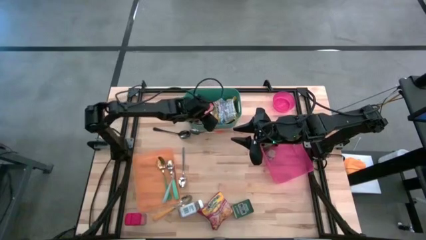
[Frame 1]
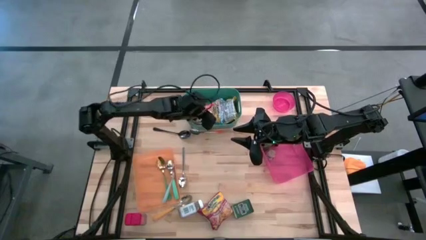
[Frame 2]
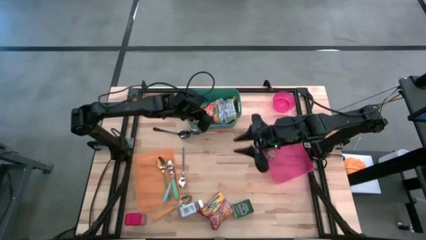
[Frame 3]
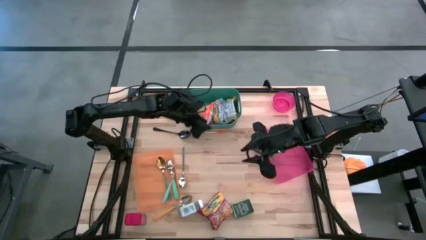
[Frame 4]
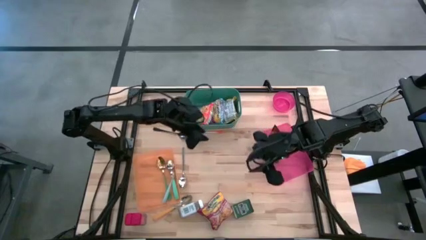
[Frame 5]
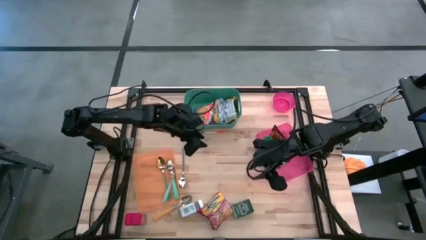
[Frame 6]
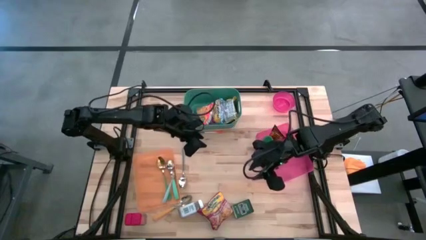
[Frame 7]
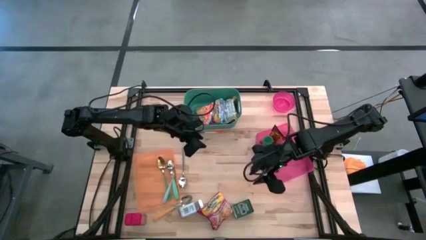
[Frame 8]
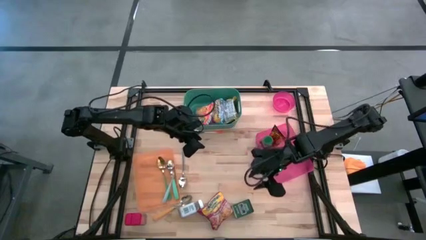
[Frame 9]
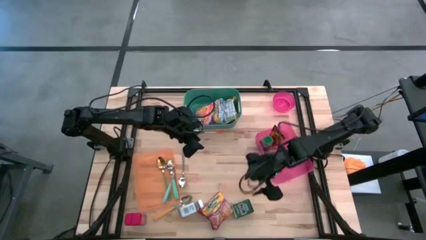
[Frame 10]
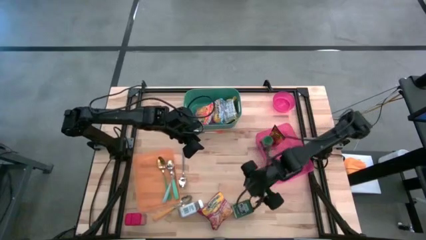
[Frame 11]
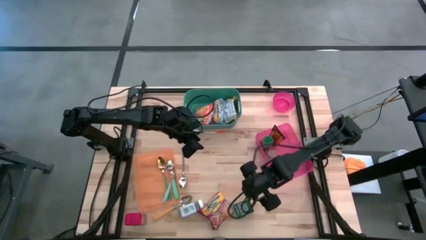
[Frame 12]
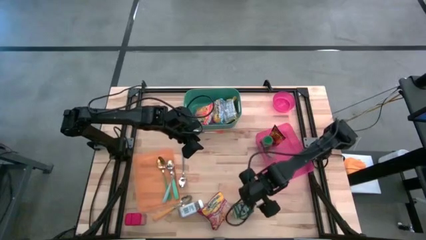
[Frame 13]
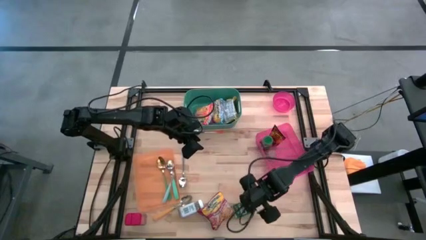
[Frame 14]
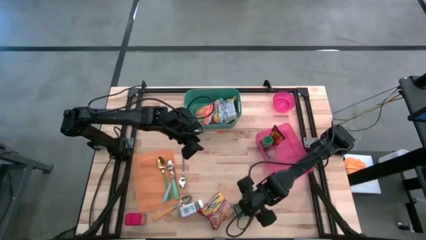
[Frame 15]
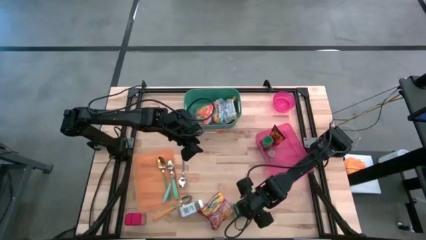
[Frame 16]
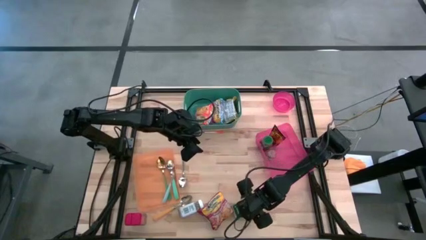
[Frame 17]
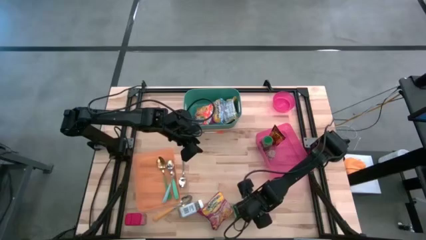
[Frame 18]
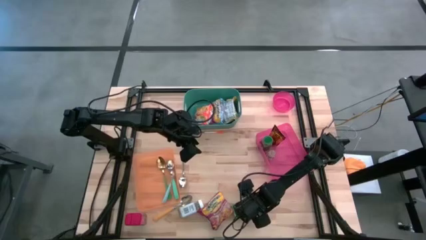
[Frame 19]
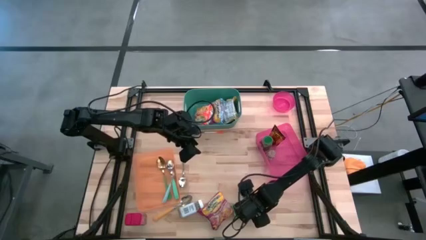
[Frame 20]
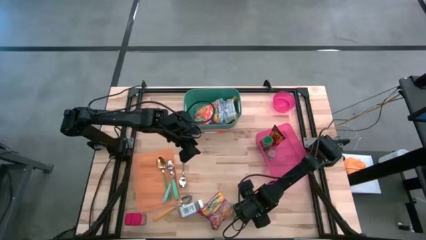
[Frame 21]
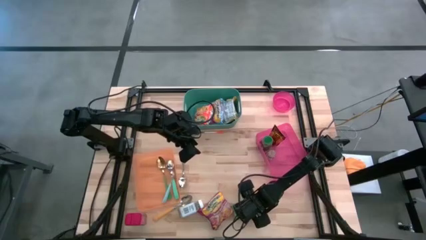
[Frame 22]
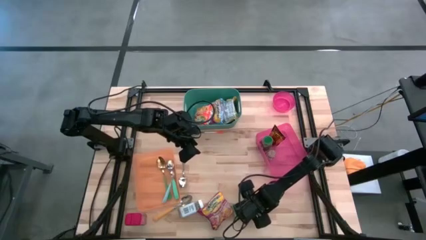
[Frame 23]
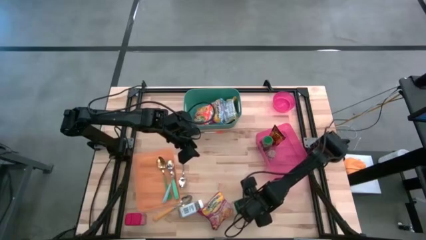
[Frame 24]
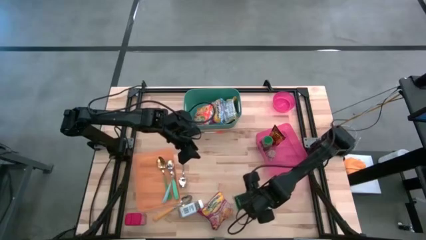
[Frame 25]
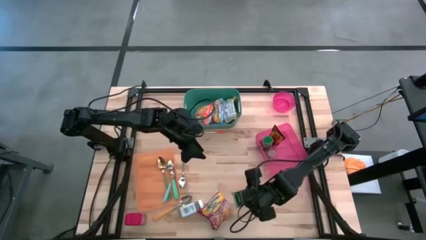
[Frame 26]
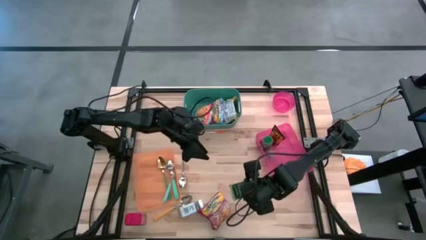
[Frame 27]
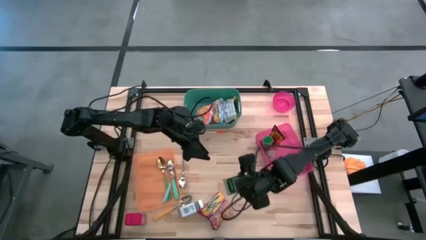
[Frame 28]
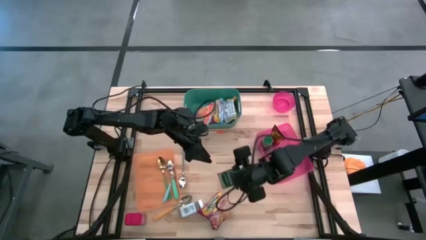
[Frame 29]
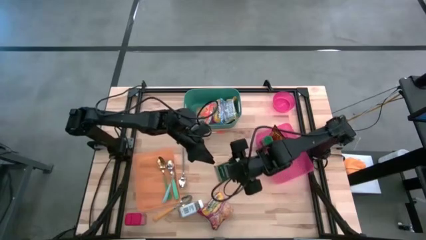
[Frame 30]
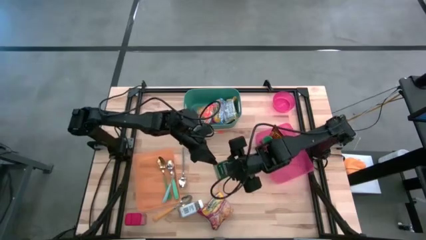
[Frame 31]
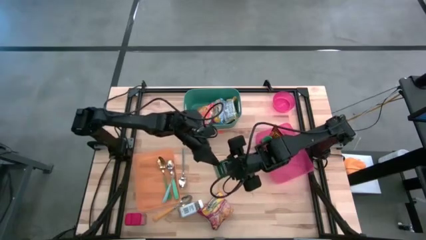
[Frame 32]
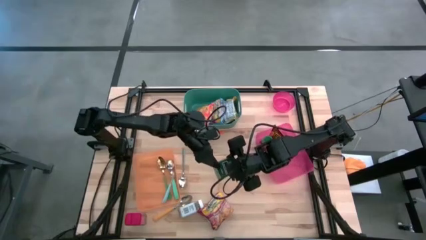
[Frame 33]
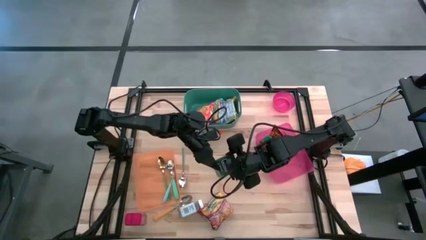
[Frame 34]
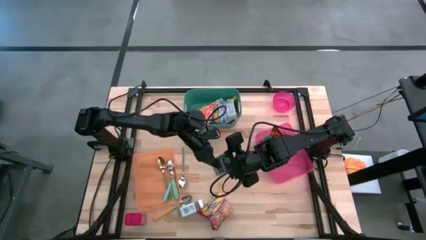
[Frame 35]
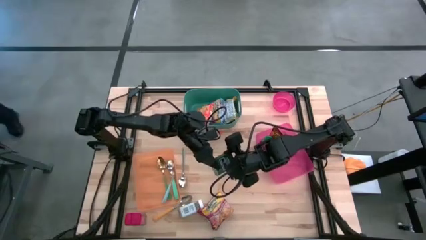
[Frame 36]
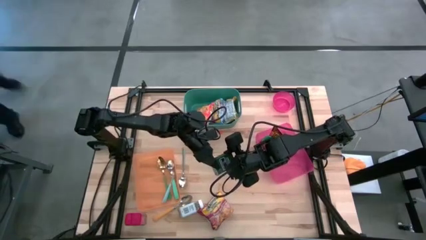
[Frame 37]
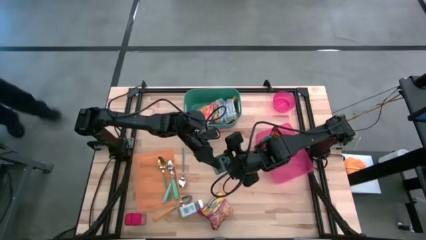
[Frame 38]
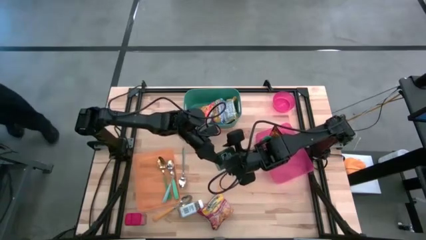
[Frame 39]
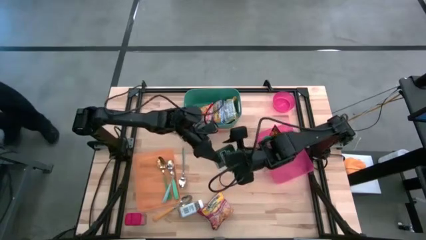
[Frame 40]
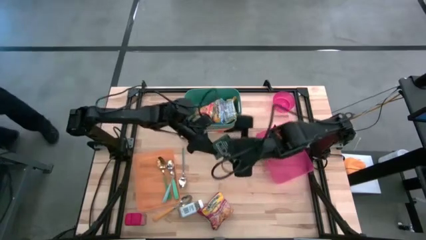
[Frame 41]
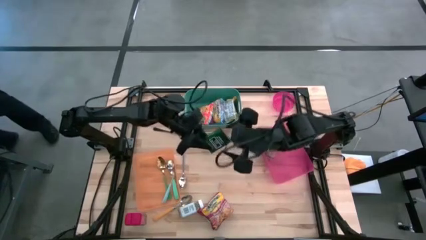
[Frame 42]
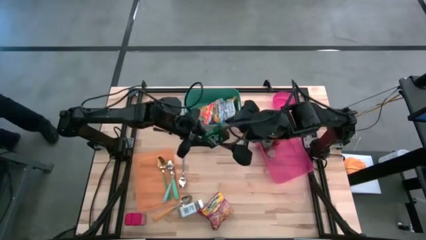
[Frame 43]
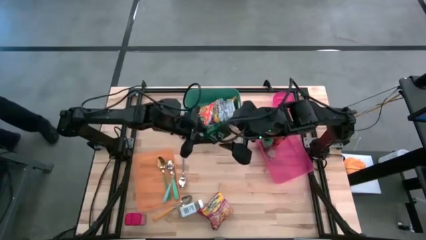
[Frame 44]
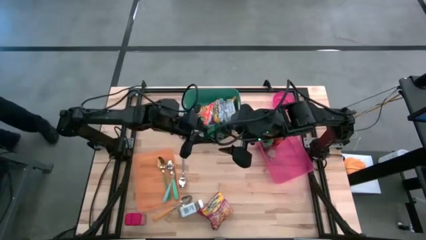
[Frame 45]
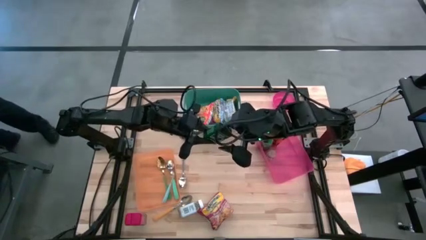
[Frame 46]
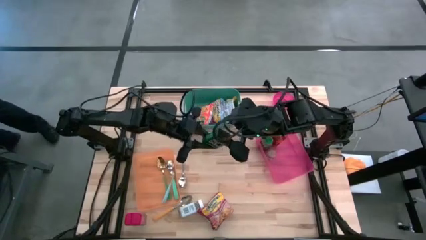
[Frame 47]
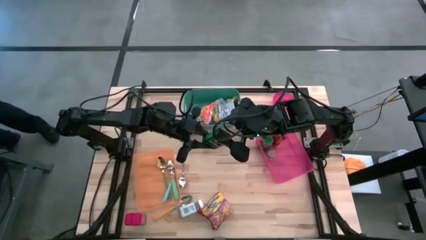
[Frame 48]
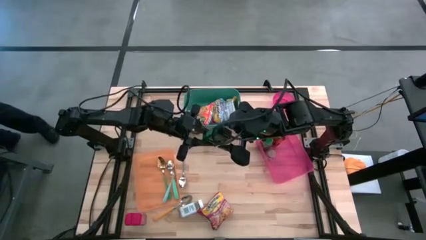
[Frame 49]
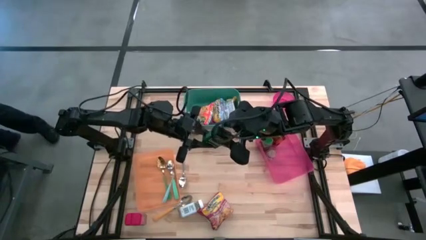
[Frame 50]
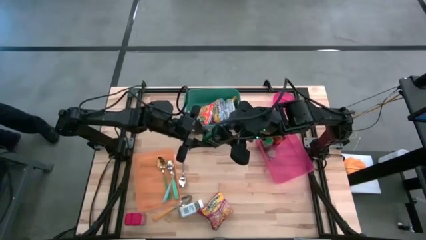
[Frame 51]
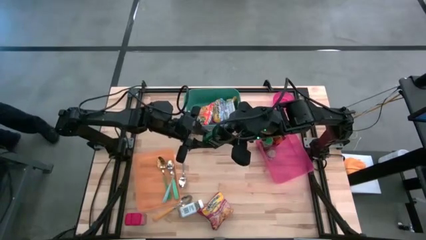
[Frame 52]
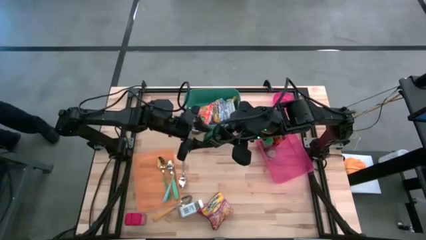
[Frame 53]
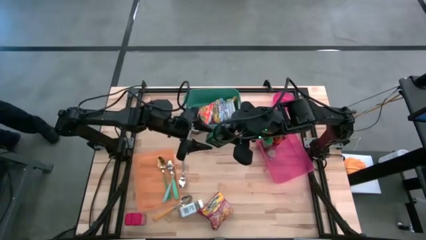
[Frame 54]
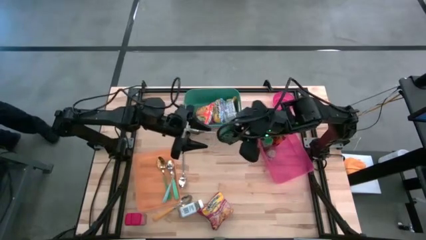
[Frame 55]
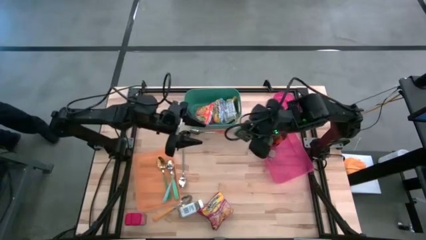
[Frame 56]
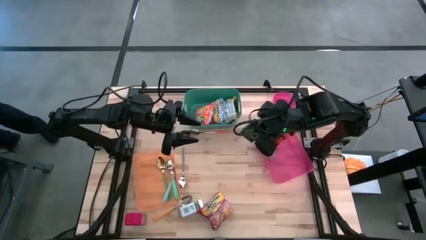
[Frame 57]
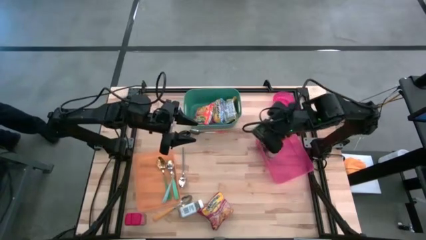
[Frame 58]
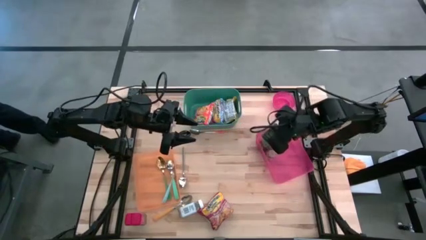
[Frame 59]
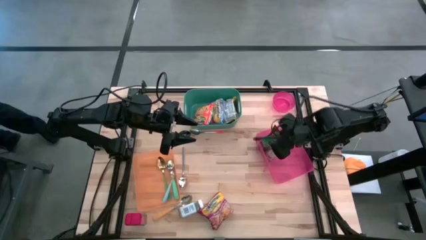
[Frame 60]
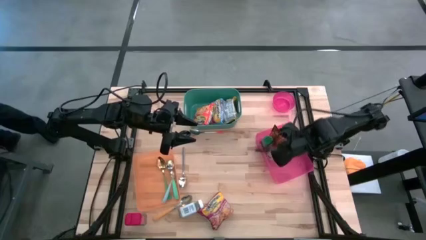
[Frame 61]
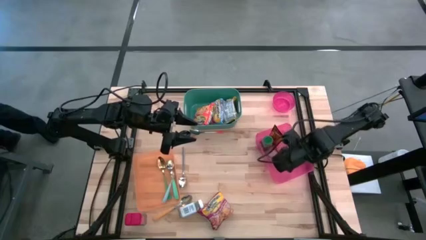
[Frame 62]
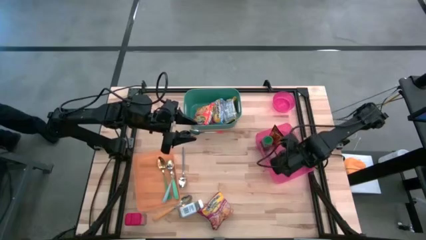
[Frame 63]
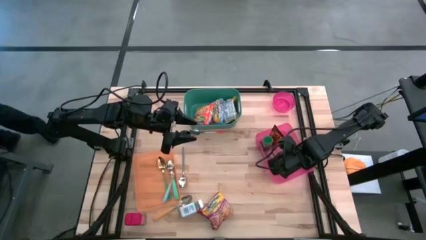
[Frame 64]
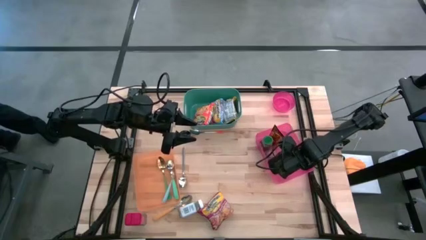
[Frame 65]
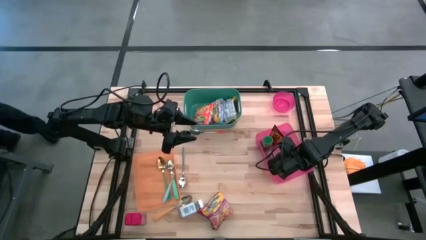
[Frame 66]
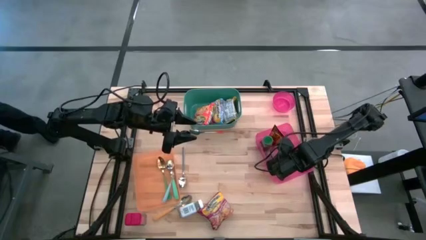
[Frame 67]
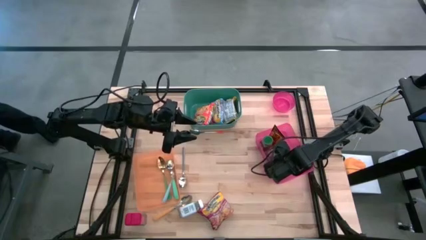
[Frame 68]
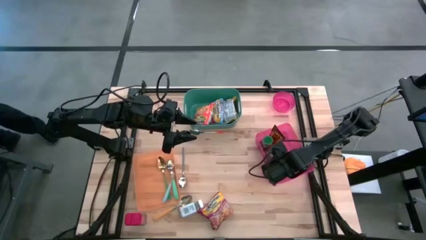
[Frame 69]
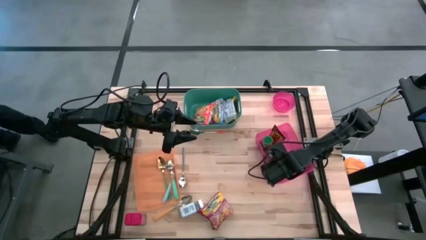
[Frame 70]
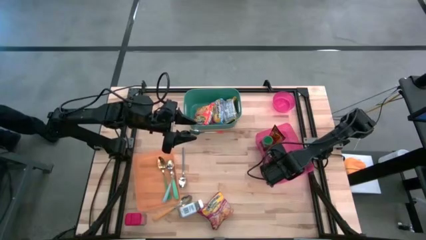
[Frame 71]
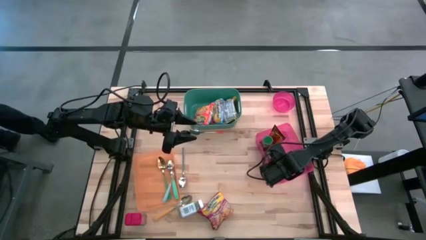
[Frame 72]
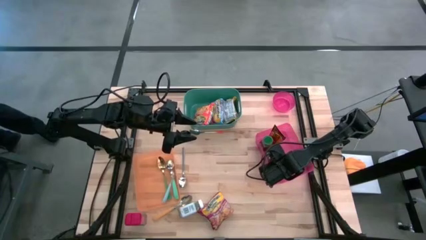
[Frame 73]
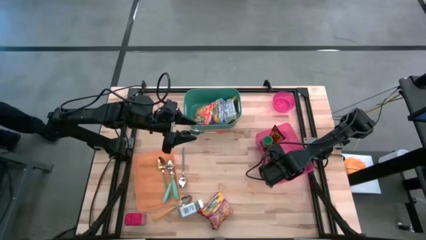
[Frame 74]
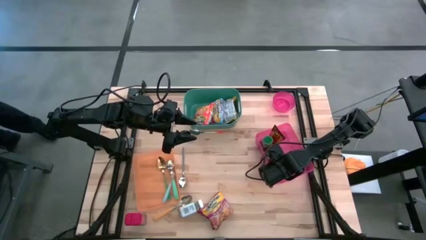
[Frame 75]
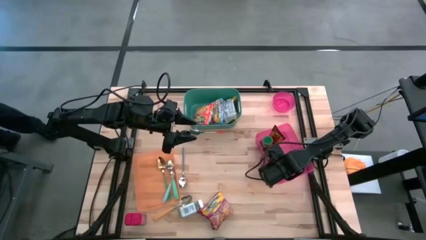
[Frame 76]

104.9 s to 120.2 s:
Put the green spice can into the pink bin
